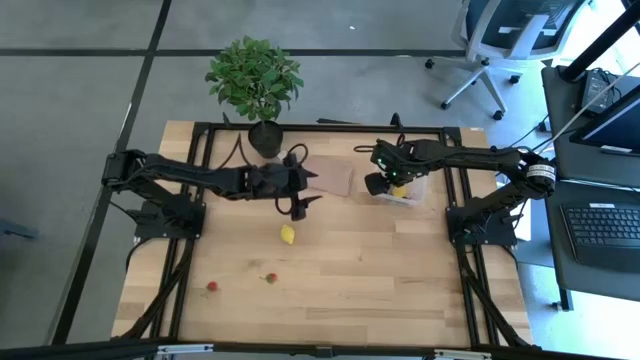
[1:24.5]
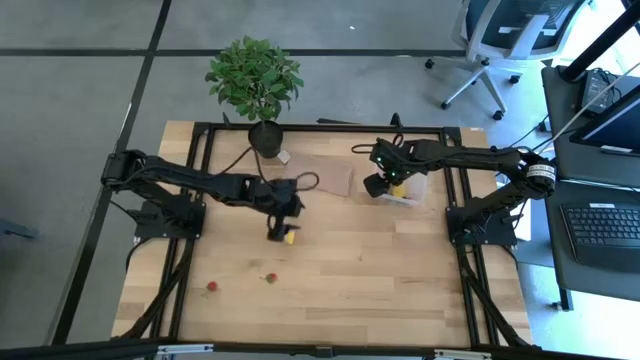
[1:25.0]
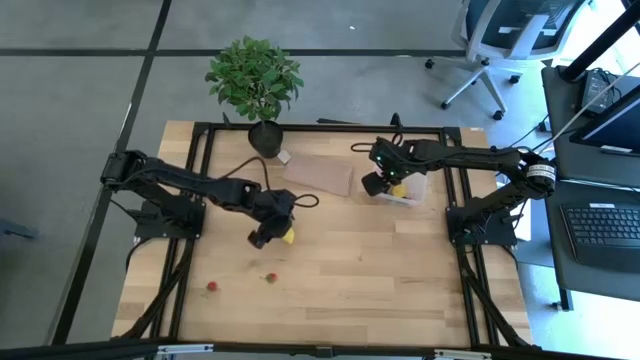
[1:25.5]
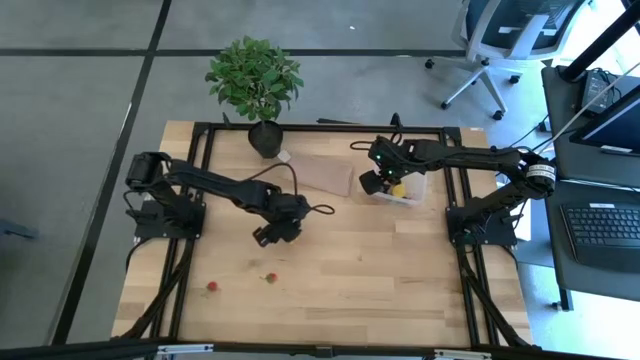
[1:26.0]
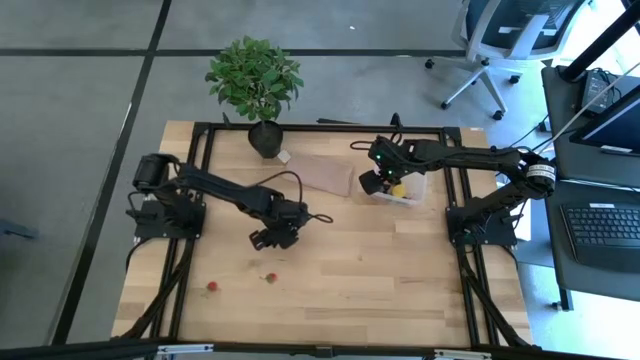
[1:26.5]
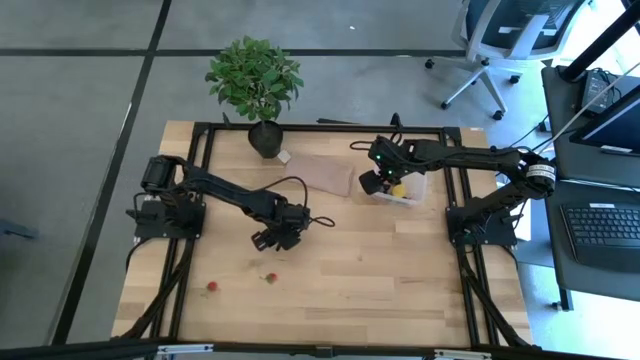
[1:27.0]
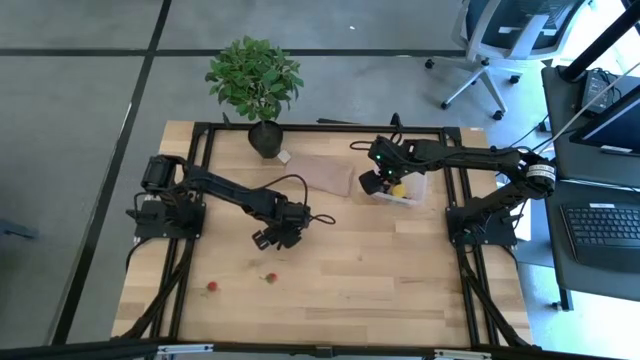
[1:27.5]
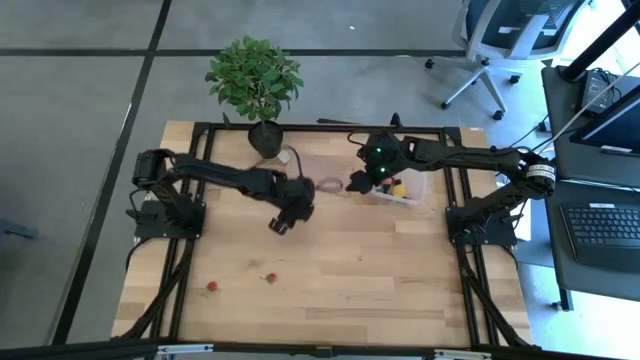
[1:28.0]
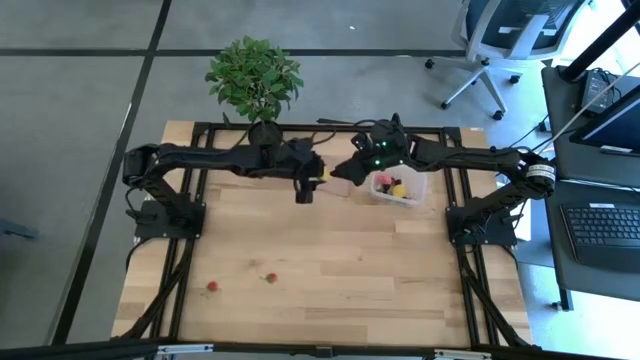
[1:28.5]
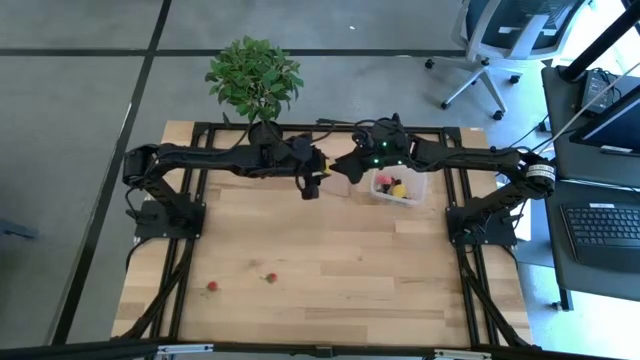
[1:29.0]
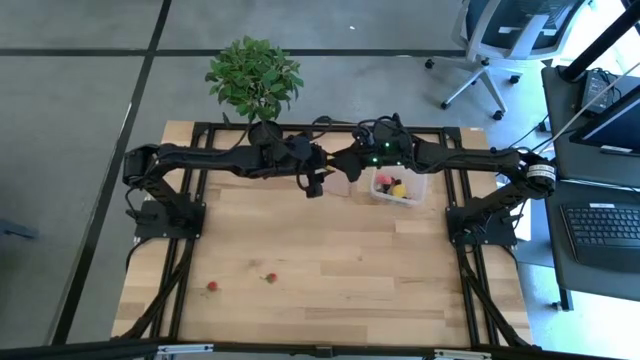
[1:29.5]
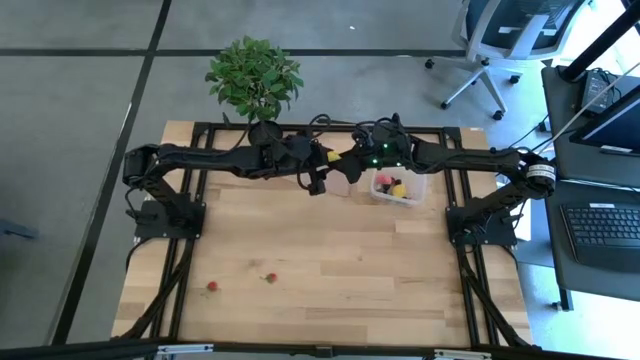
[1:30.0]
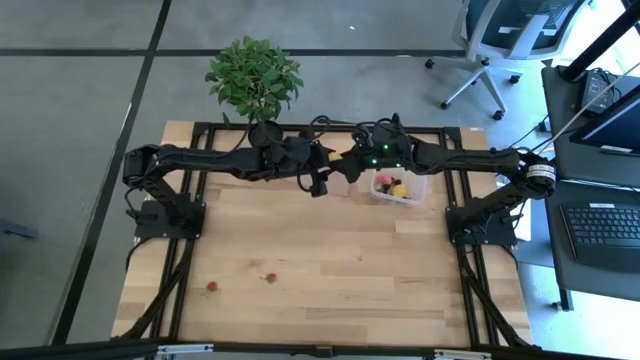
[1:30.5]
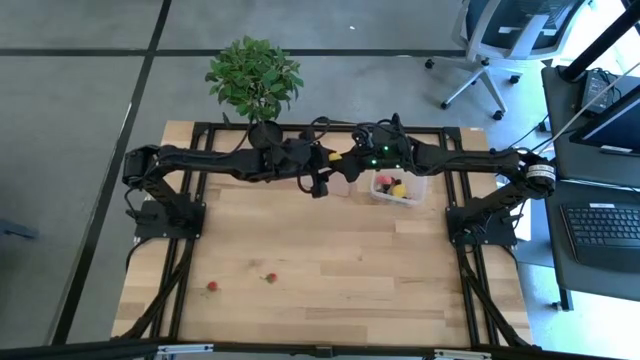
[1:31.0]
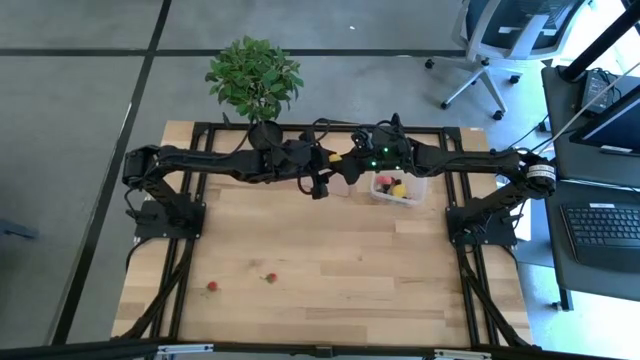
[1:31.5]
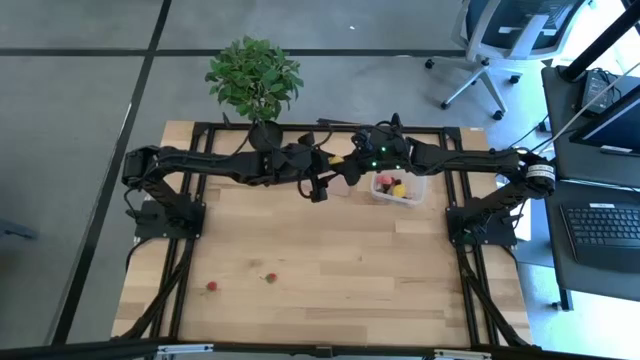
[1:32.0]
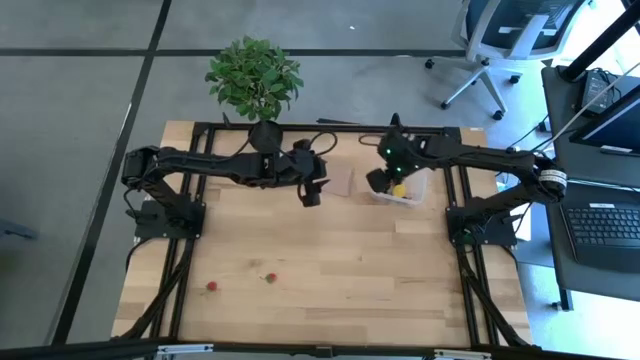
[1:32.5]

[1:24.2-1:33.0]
Task: Pick and placing Produce into tupperware
Put the yellow lemon into the transparent container

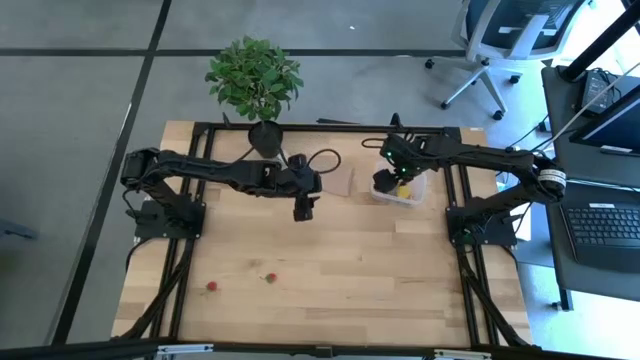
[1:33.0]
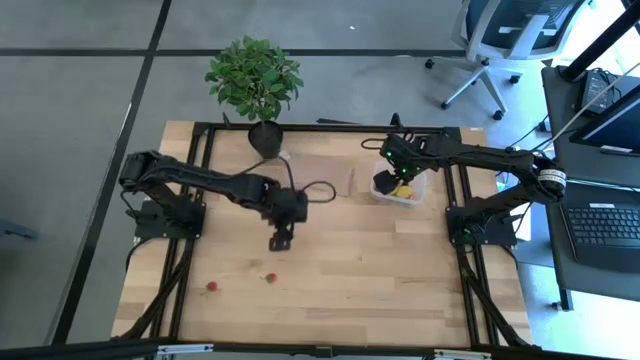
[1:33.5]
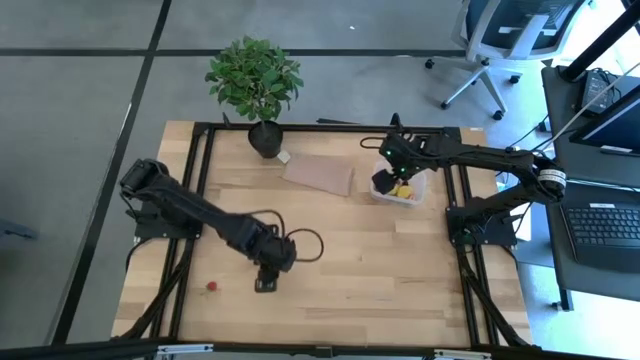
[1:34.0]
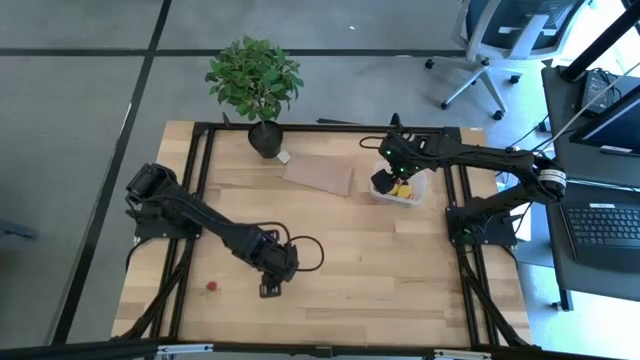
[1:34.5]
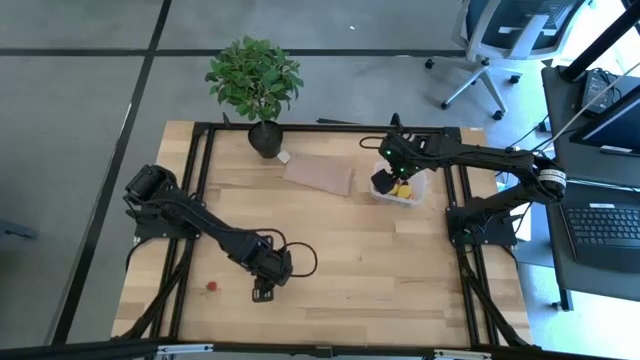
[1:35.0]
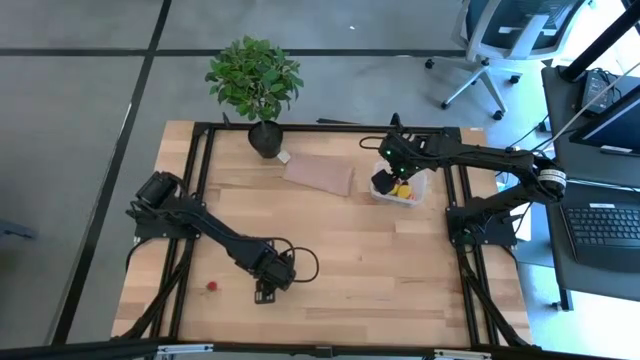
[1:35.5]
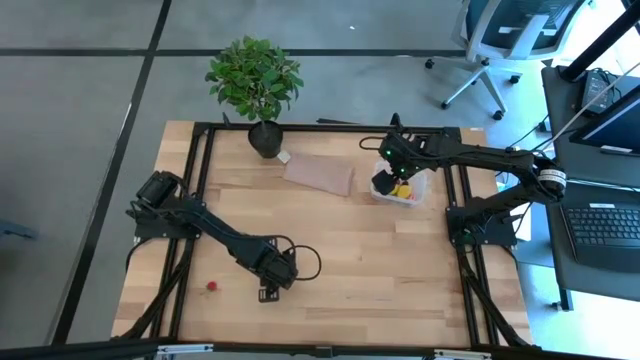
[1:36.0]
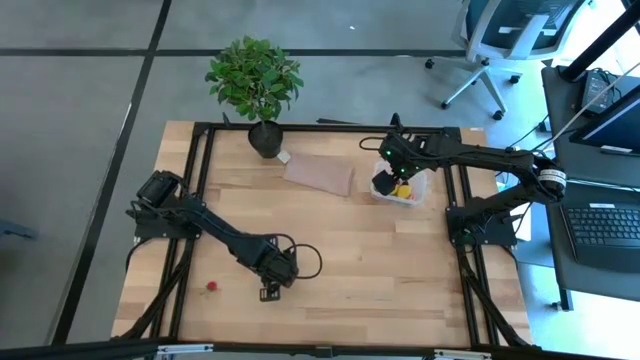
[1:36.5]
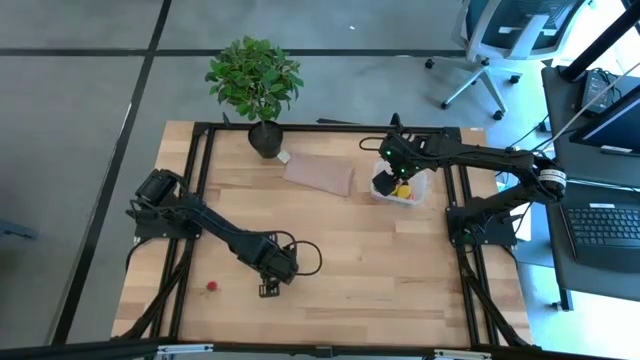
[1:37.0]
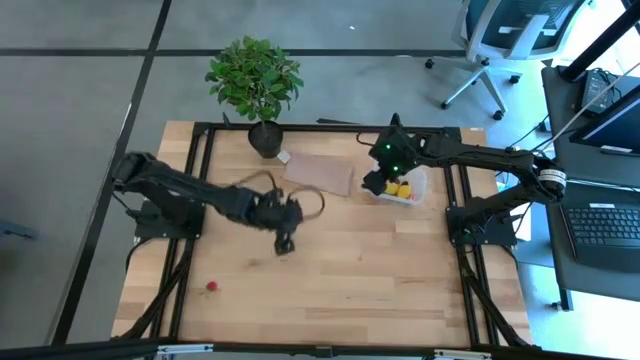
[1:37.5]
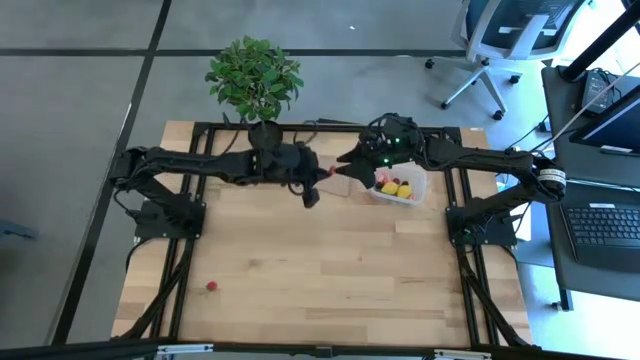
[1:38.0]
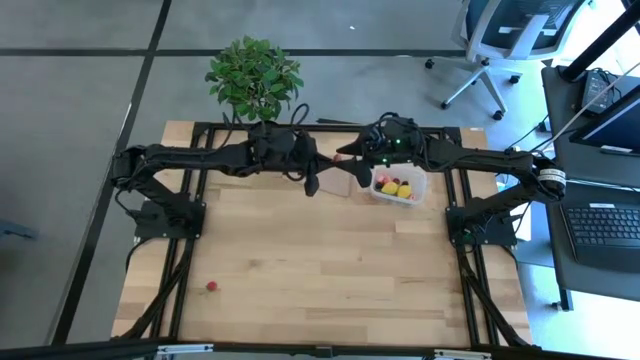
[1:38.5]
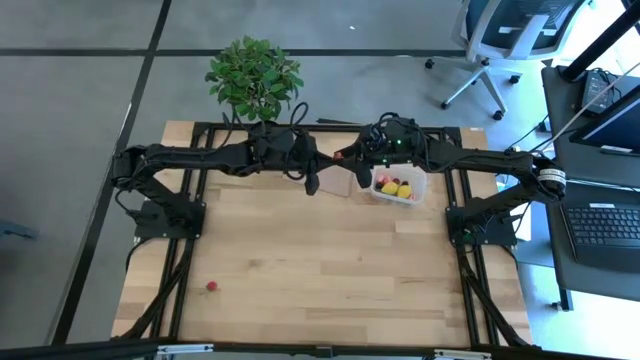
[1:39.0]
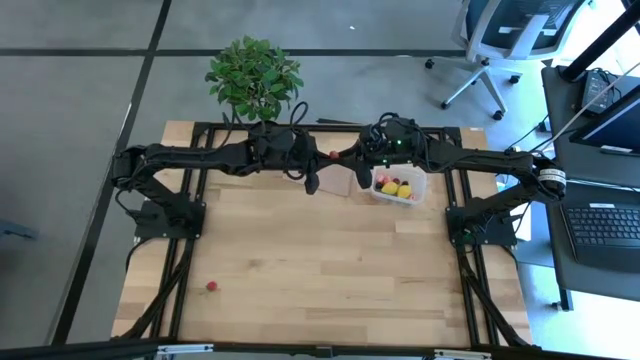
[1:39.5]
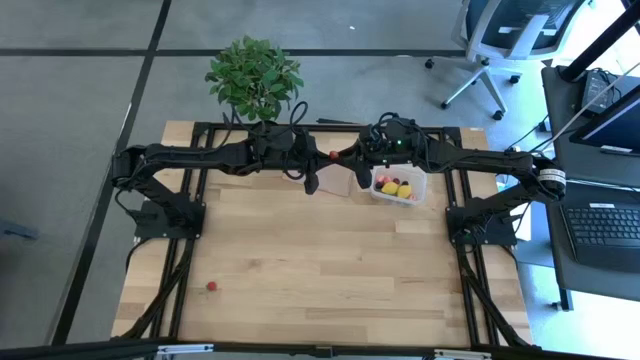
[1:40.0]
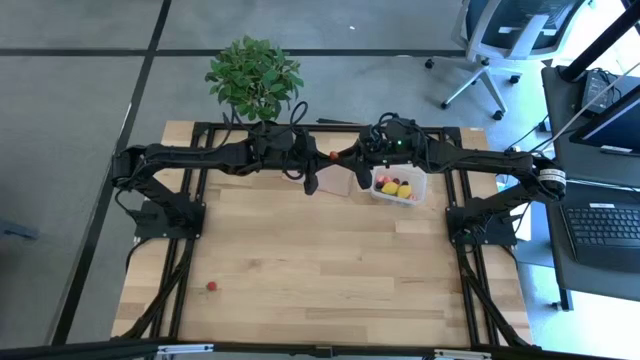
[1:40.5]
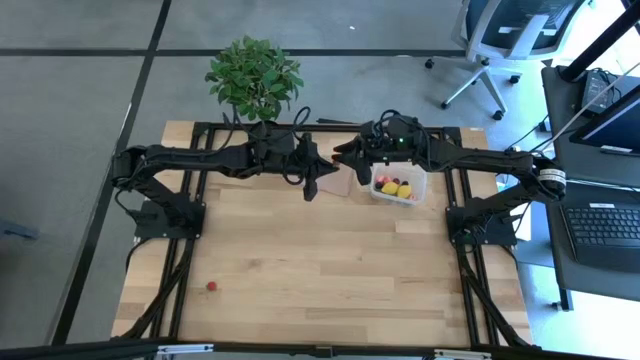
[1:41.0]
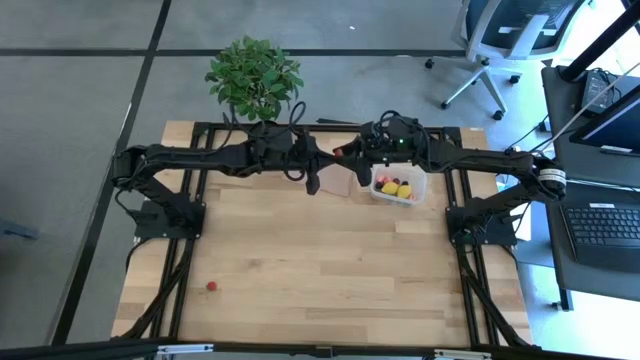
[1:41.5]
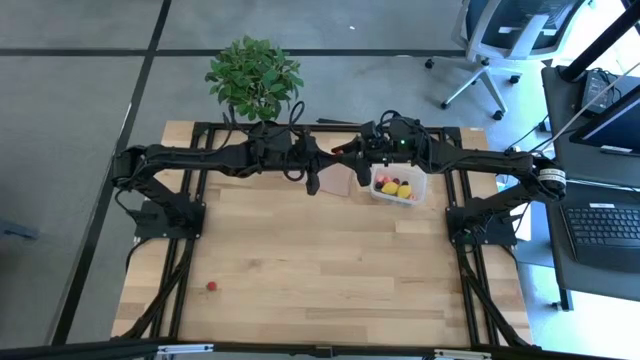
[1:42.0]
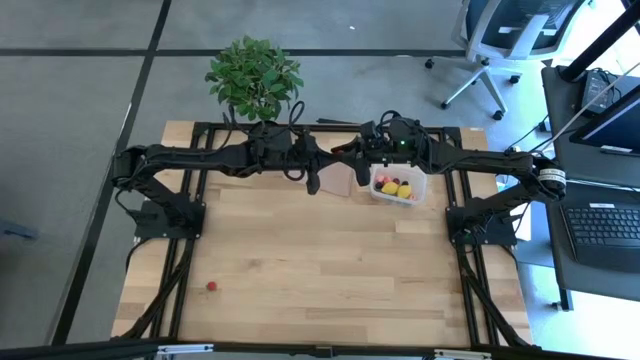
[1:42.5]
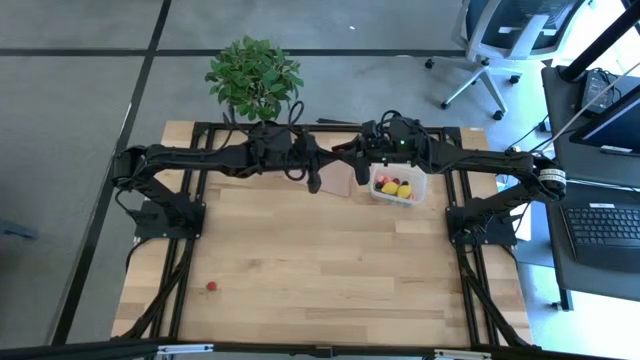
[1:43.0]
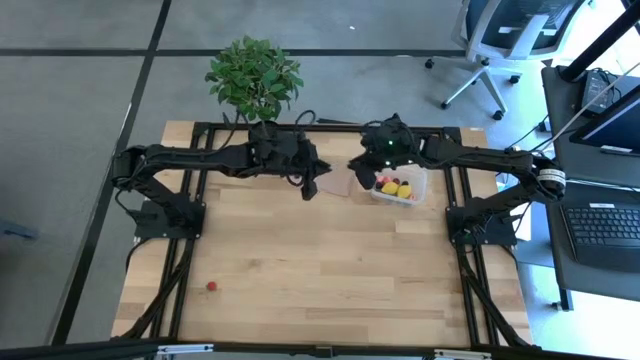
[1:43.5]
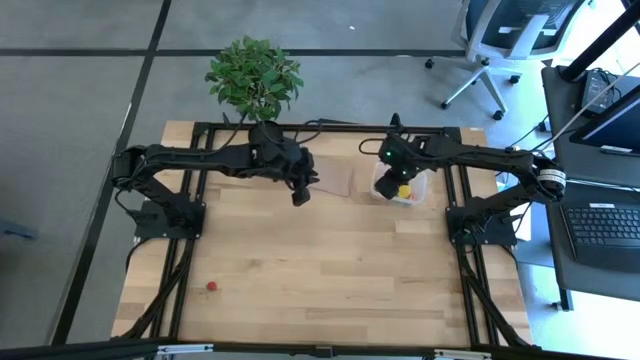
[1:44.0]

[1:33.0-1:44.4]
Put the right red strawberry into the transparent container

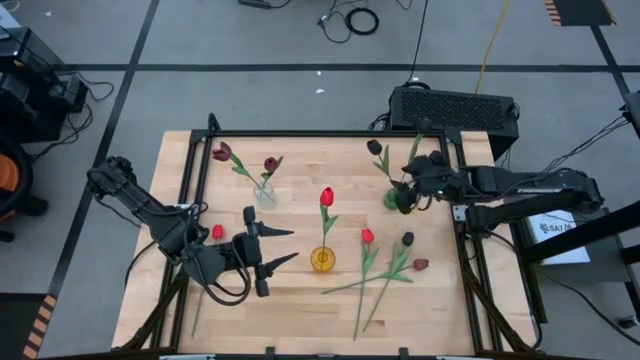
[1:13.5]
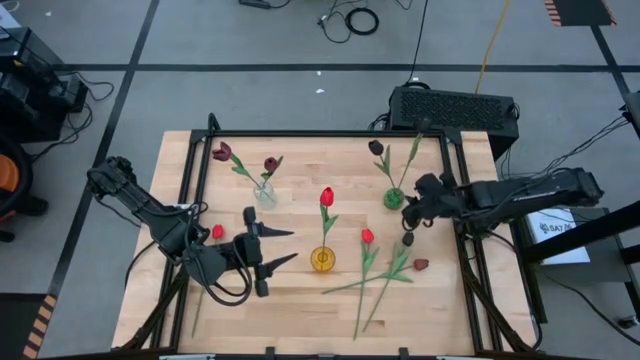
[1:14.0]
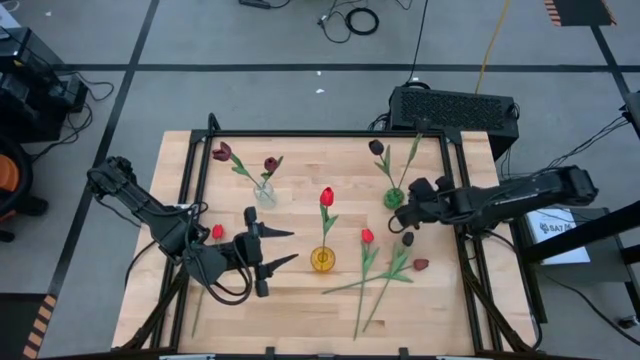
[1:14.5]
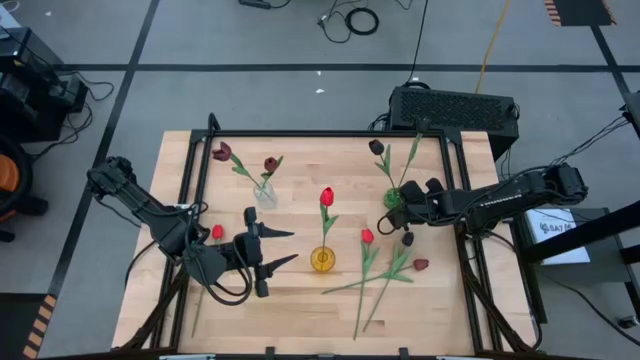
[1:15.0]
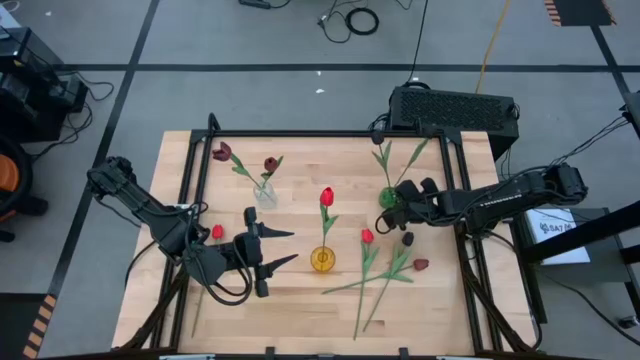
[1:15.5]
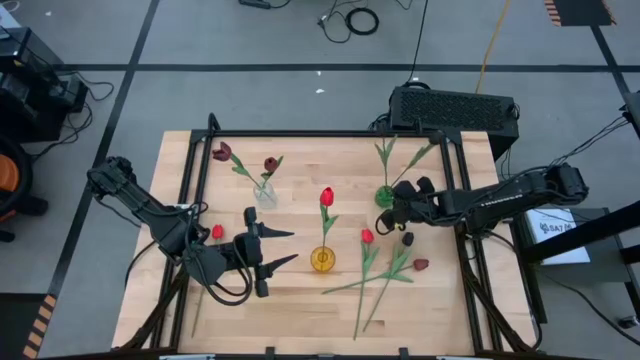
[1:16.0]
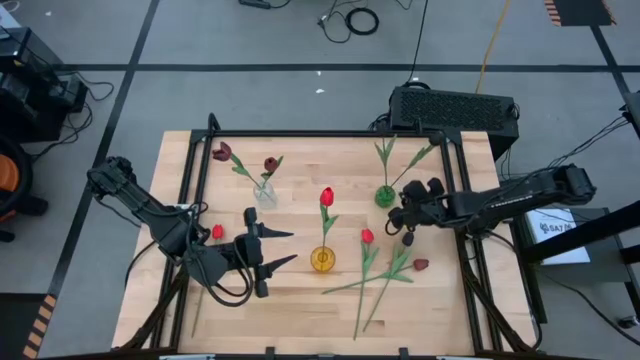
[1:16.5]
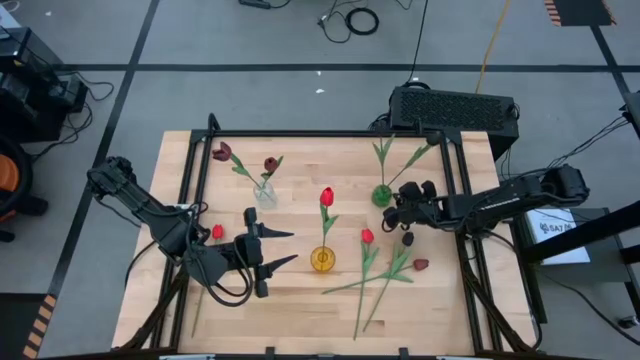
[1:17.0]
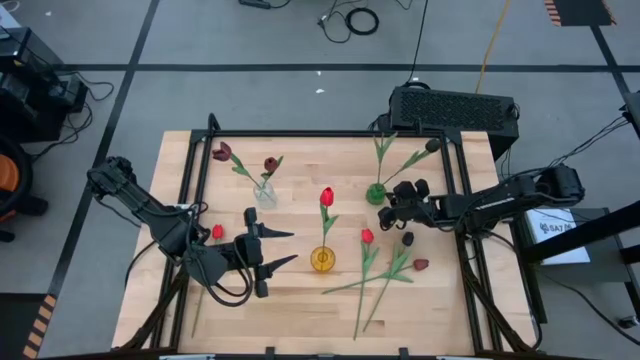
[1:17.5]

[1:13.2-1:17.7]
Task: Sort flowers into vase by color
Adjust the green vase
